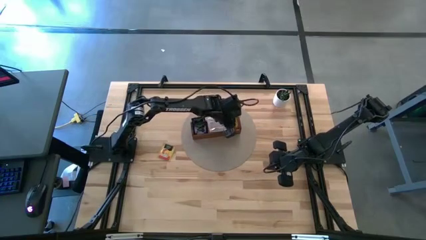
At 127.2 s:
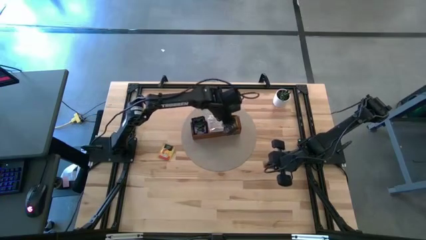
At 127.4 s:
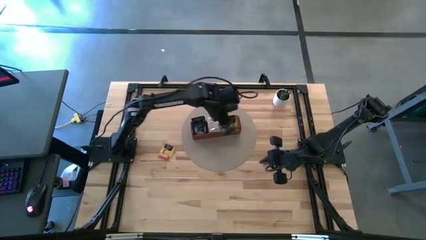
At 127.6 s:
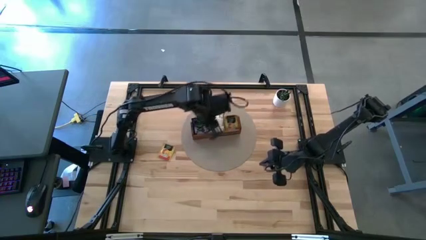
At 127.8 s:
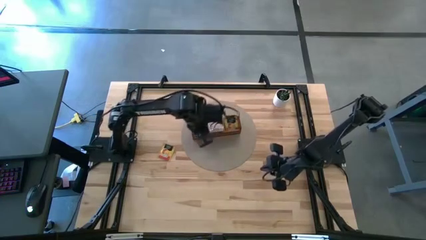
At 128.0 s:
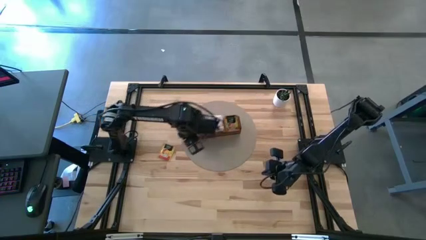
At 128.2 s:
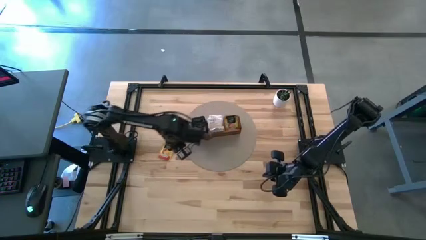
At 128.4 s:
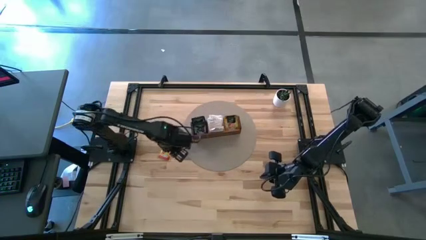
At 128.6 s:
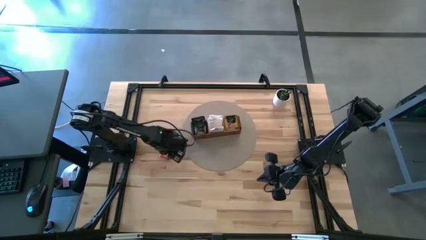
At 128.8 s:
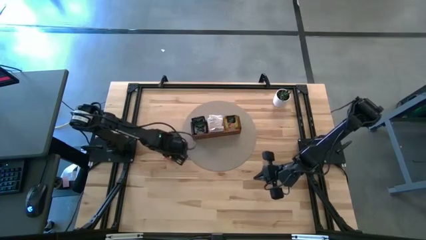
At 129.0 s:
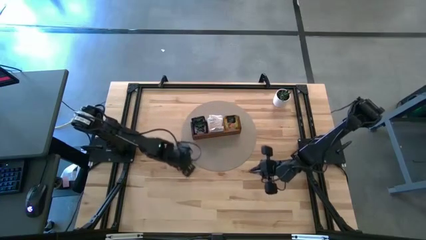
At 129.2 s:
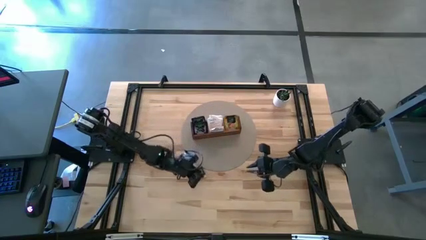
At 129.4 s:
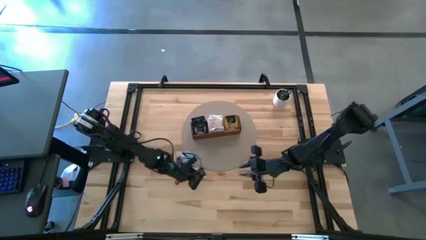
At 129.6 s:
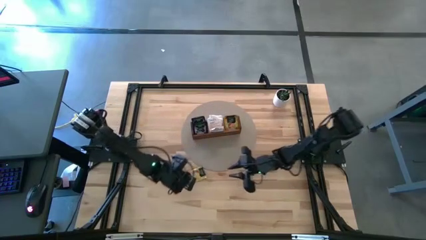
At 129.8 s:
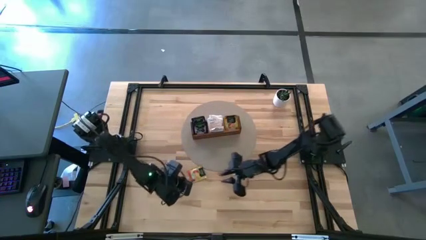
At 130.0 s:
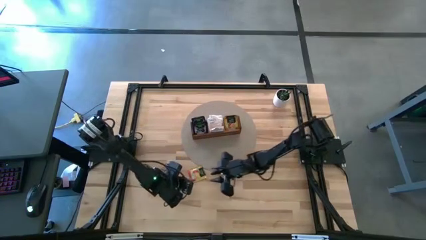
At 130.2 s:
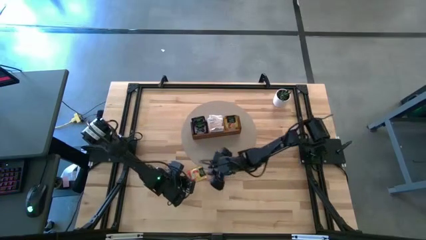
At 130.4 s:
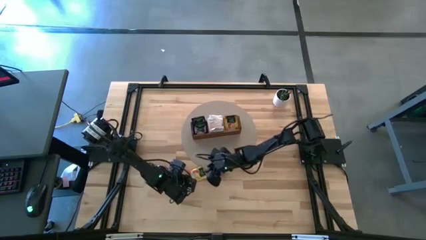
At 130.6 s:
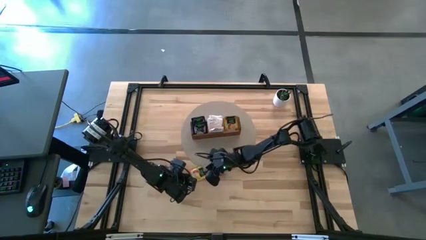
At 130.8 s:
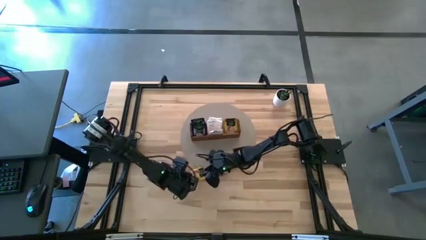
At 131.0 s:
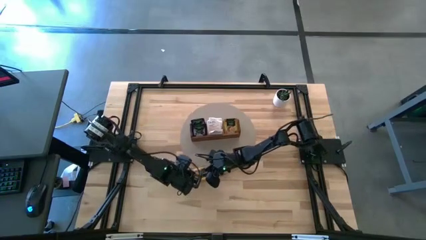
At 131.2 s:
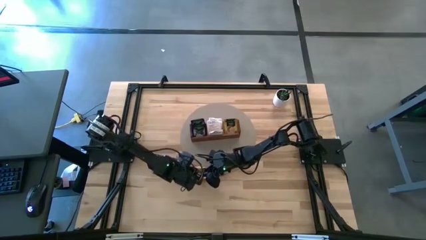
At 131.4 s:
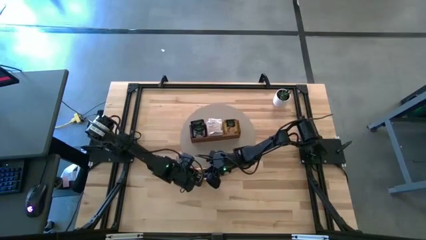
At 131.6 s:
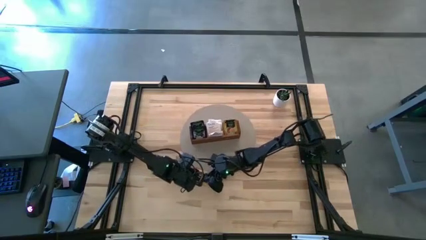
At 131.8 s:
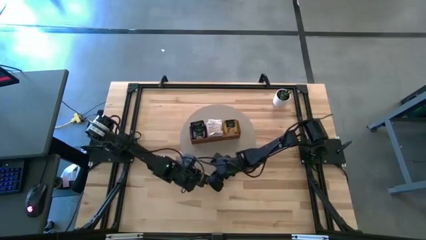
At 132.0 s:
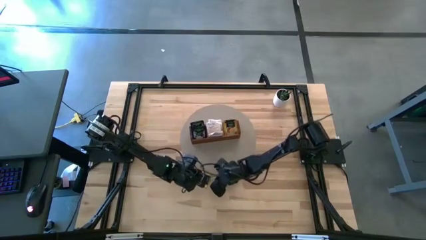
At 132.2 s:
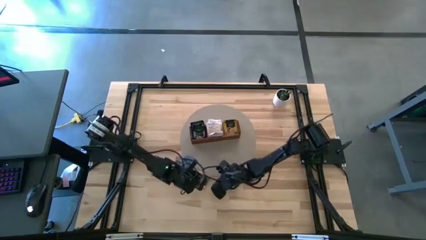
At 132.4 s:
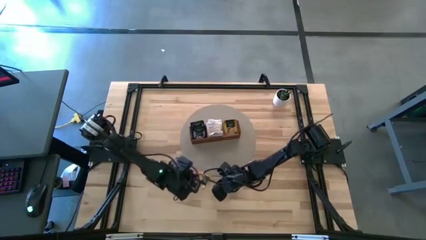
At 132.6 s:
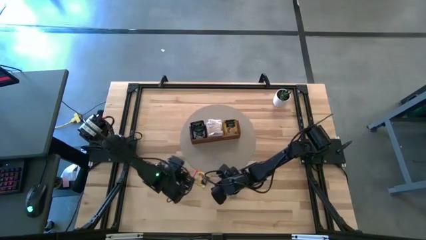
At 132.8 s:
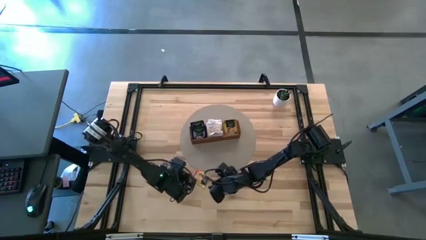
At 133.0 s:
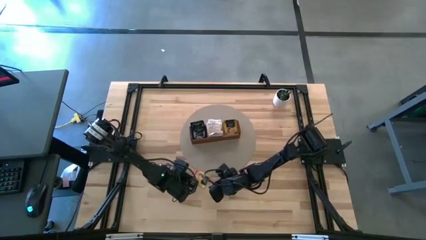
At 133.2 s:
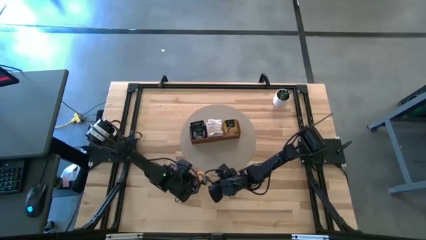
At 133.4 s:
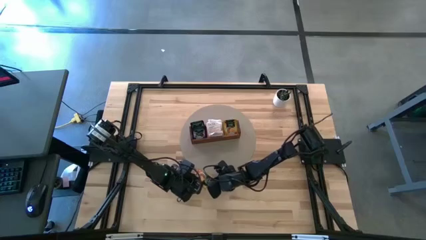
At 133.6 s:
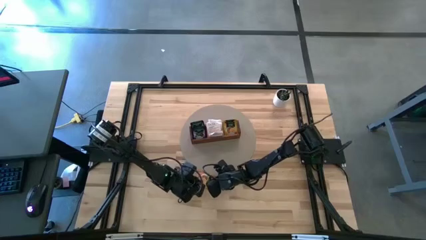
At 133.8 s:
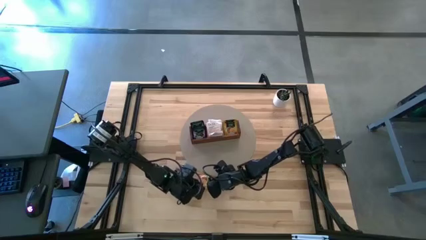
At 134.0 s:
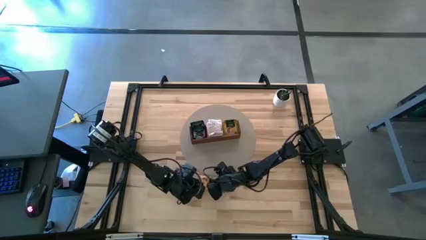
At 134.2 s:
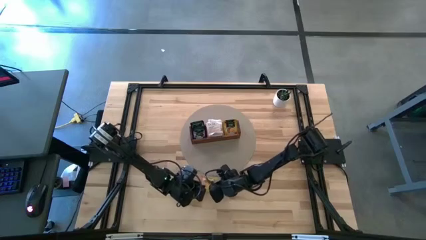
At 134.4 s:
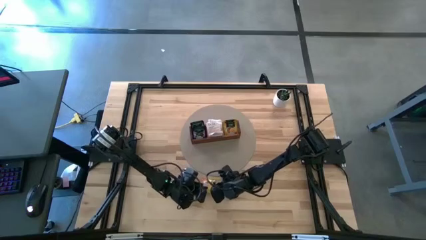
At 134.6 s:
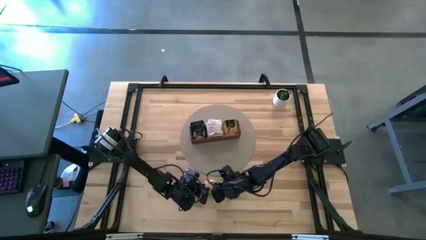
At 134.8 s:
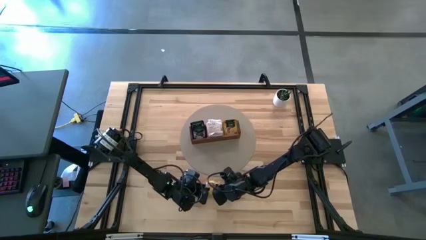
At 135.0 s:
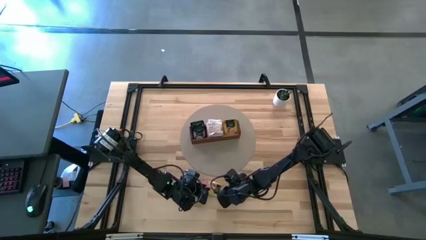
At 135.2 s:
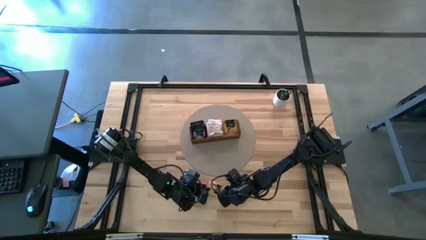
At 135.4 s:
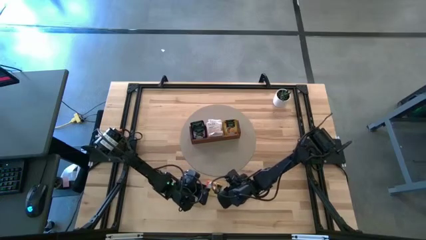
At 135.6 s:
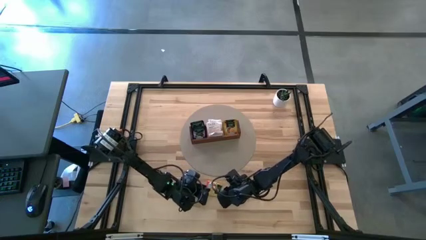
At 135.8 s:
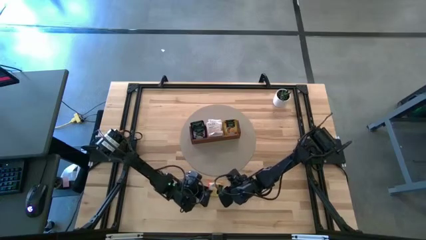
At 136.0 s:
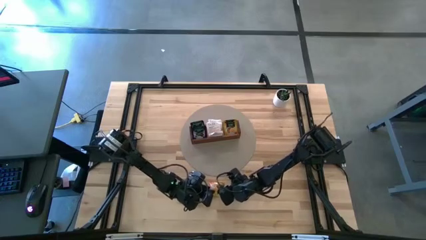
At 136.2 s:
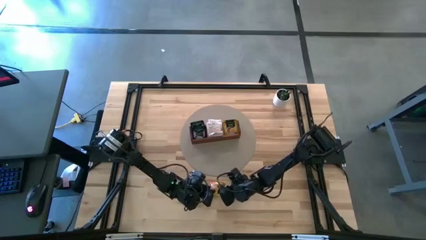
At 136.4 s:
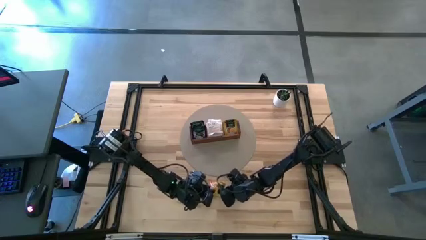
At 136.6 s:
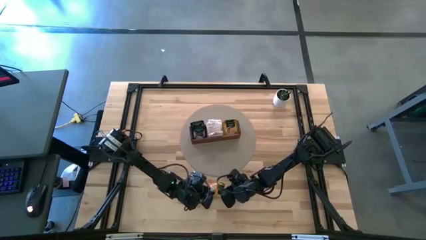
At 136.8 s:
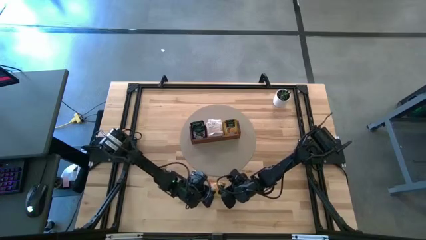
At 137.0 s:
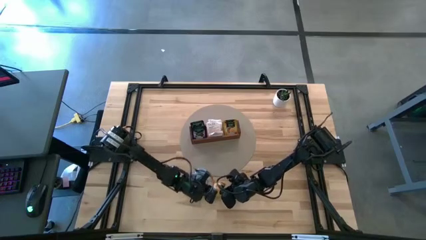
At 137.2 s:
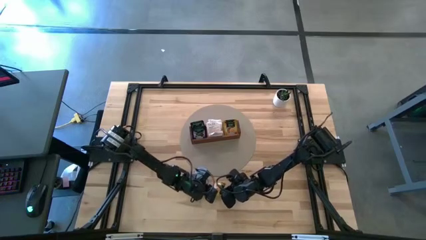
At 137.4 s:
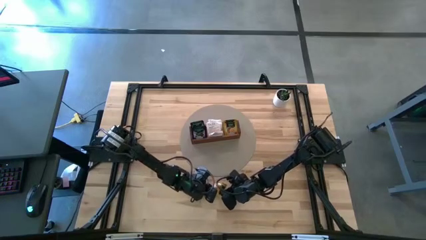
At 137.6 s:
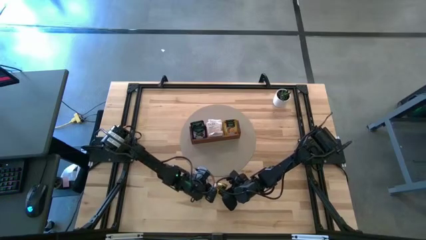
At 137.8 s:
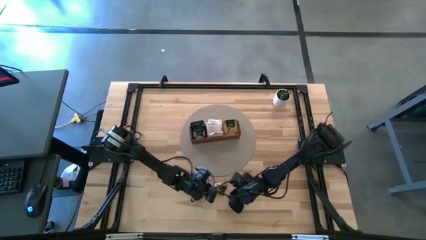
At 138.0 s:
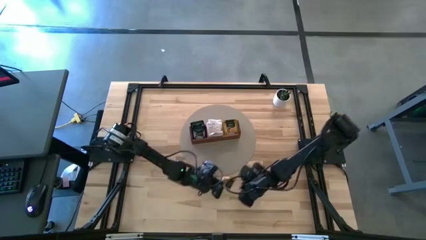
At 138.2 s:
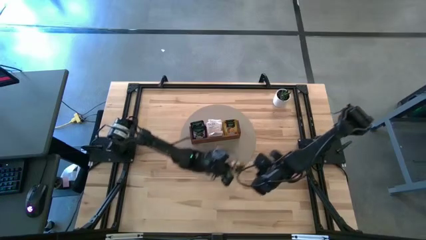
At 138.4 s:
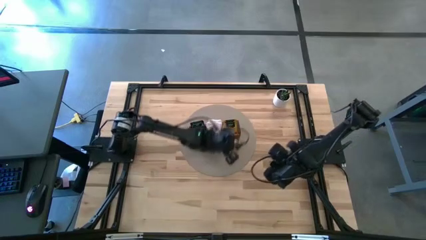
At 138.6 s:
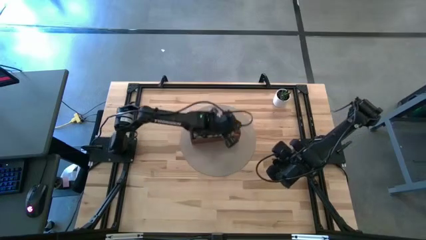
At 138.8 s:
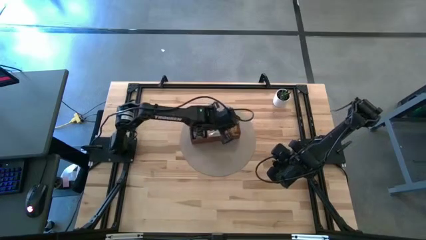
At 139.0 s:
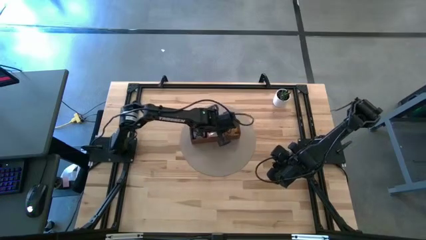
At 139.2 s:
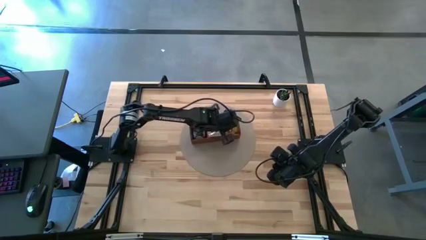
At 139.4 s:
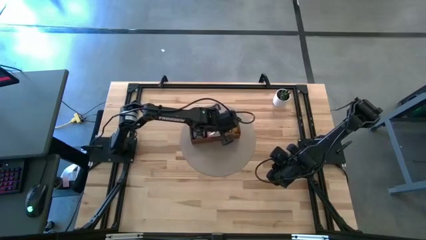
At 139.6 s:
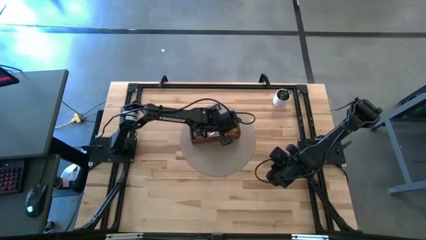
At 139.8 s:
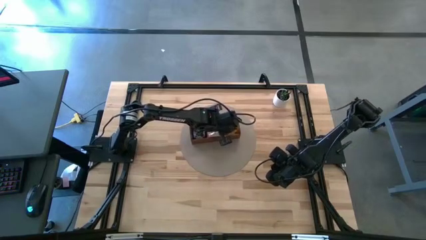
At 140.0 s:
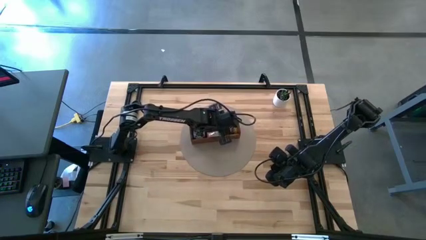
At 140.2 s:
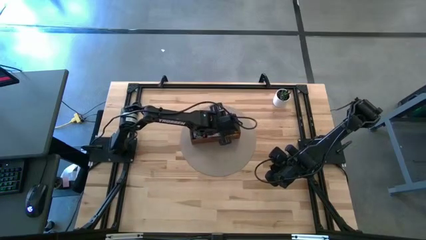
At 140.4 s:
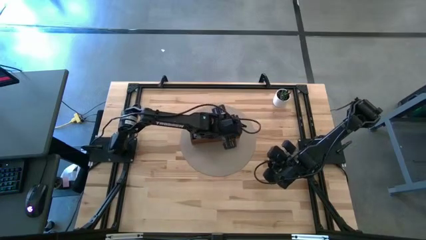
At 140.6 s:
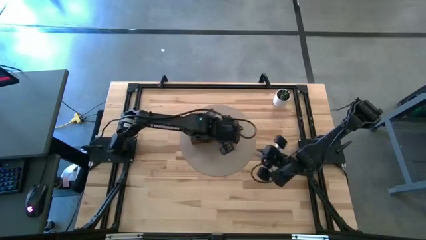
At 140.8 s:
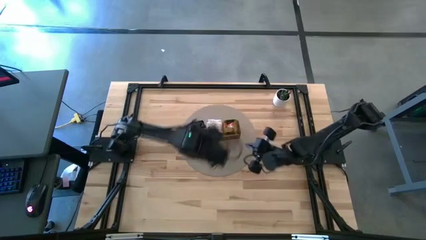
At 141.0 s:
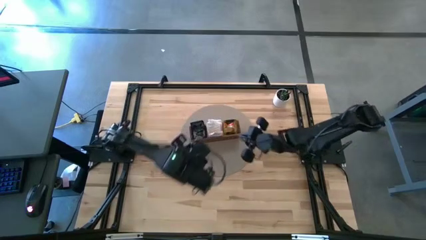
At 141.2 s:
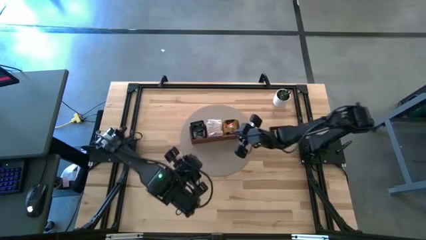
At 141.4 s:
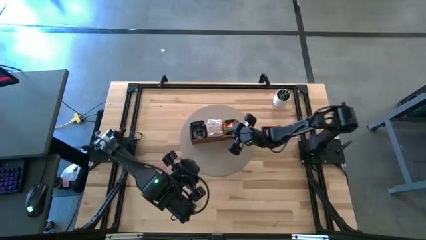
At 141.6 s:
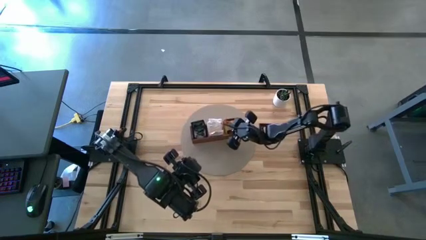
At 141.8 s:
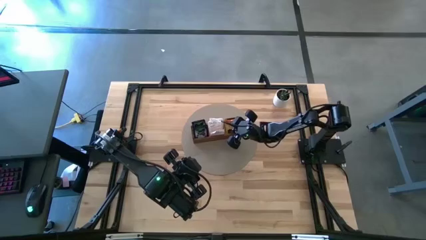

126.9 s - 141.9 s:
Task: Pick & Place Tea
Put the yellow tea bag into the right section of the wooden organizer
